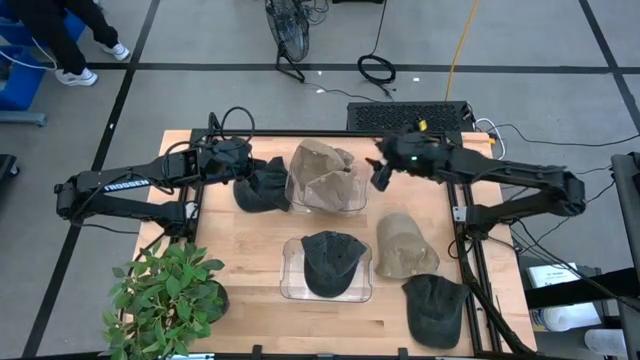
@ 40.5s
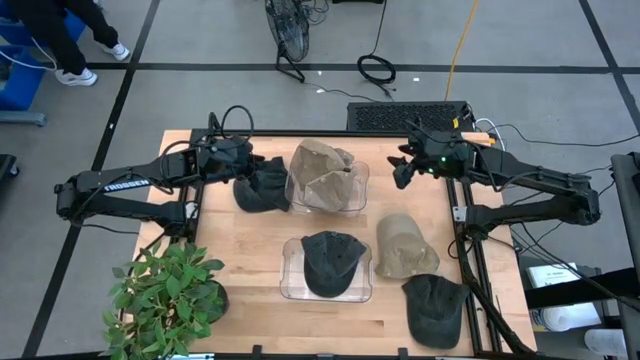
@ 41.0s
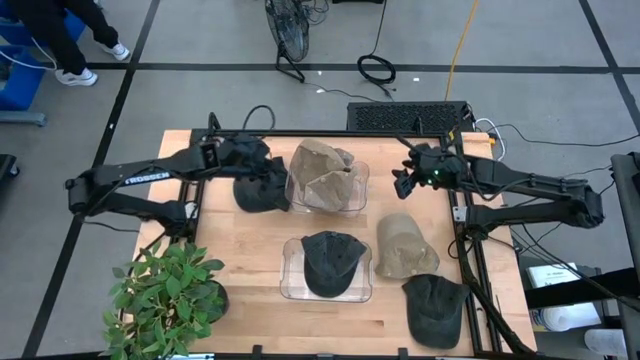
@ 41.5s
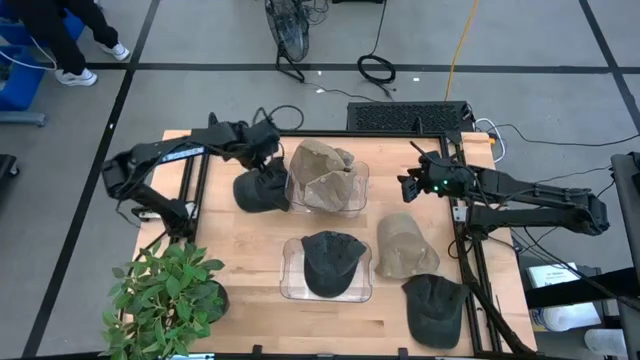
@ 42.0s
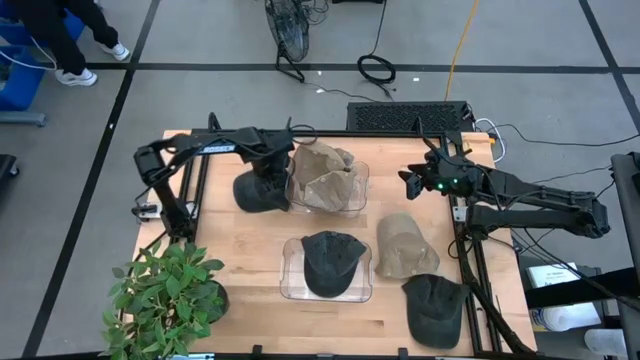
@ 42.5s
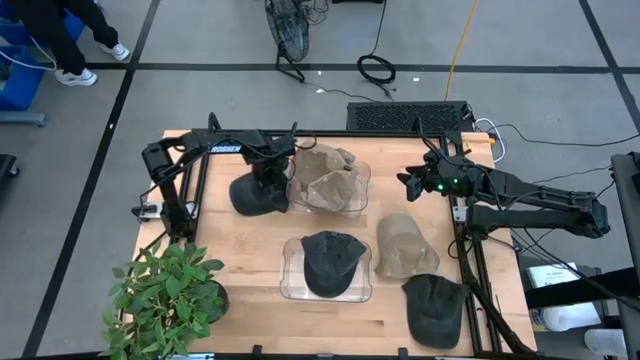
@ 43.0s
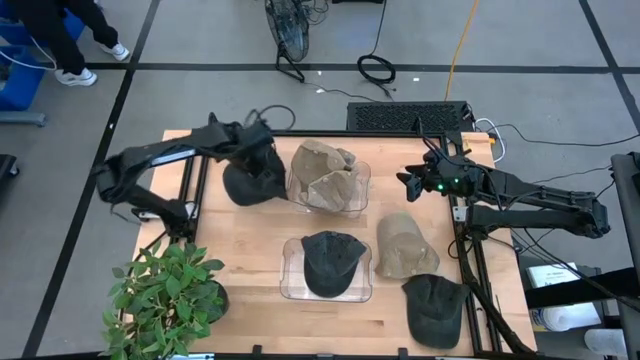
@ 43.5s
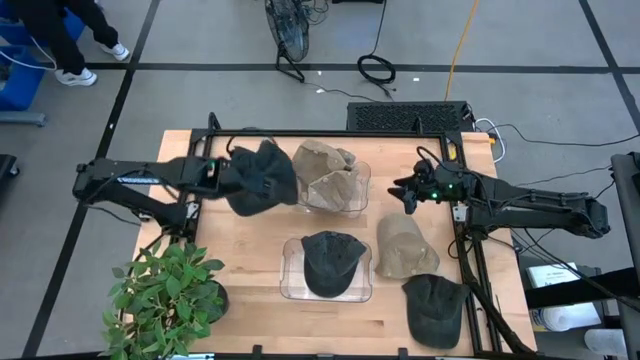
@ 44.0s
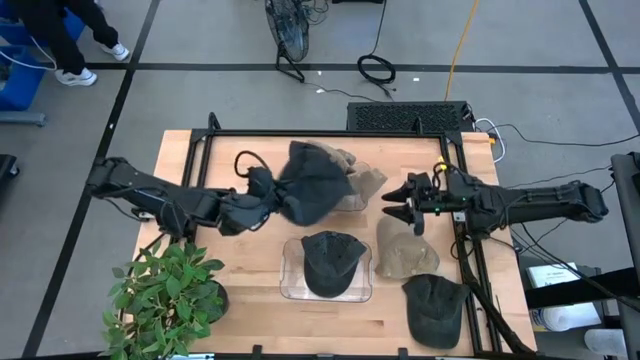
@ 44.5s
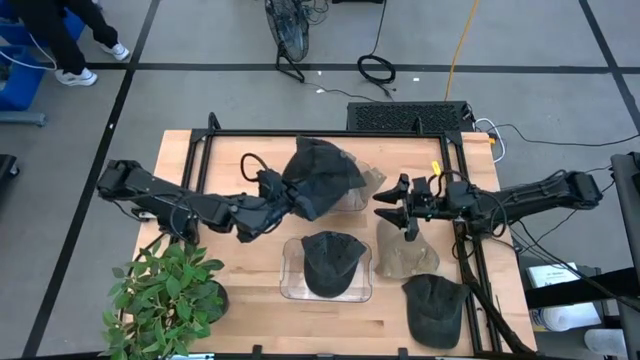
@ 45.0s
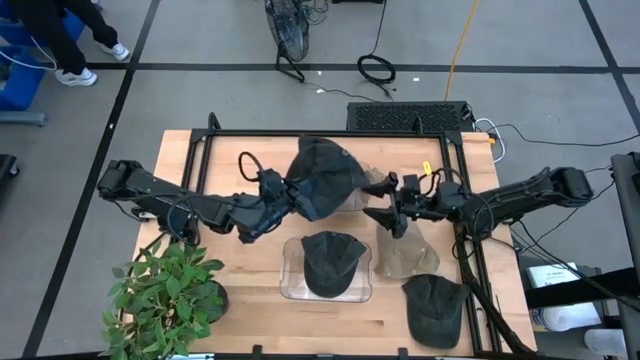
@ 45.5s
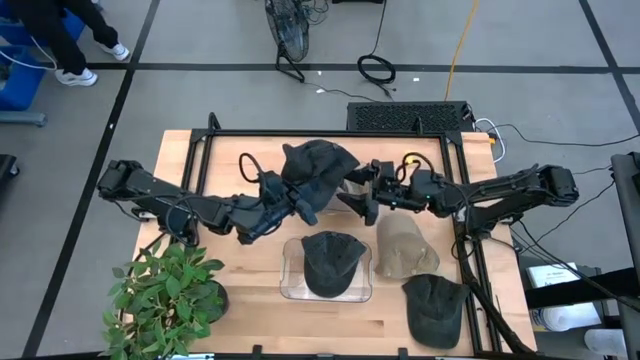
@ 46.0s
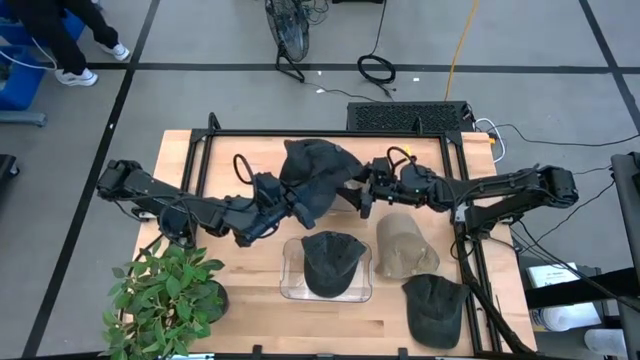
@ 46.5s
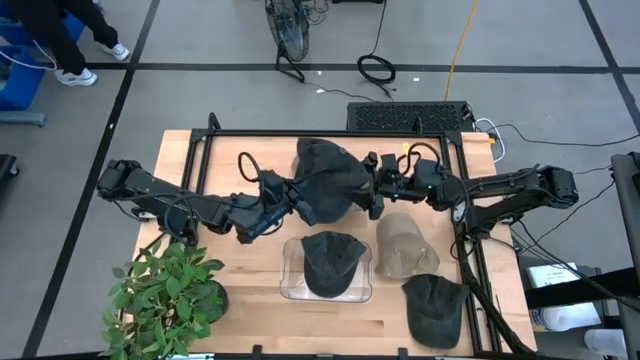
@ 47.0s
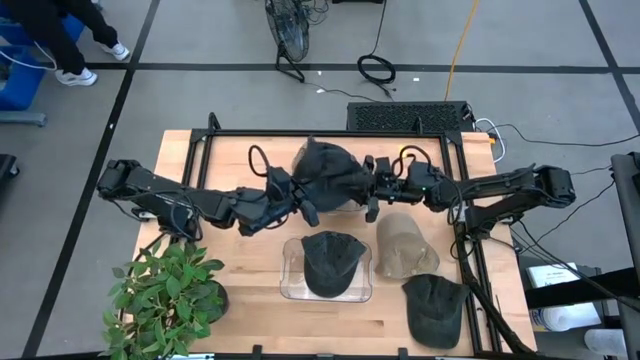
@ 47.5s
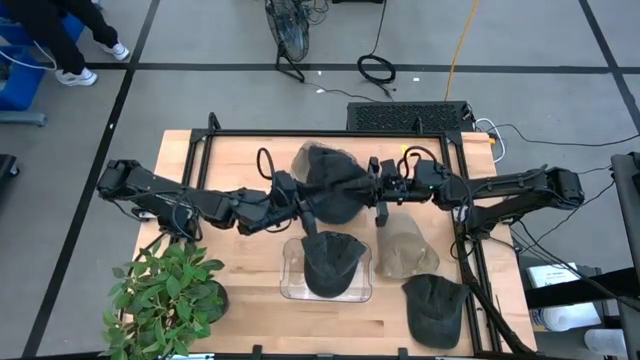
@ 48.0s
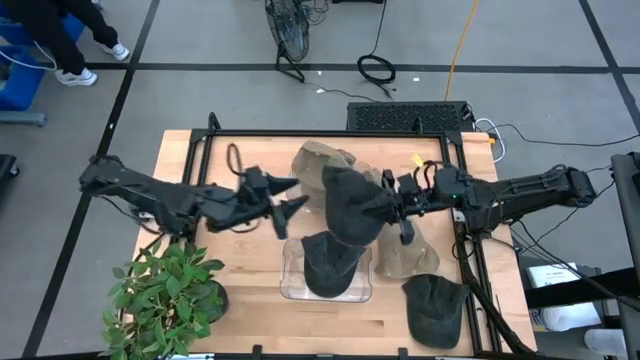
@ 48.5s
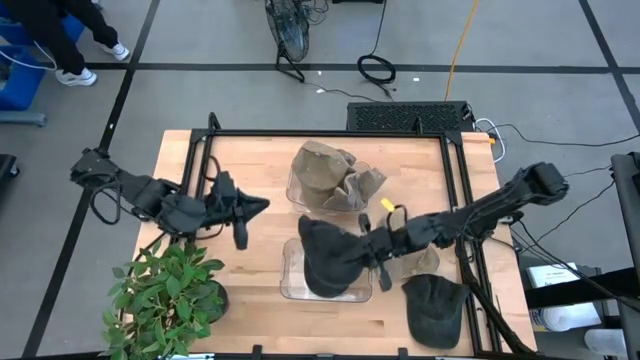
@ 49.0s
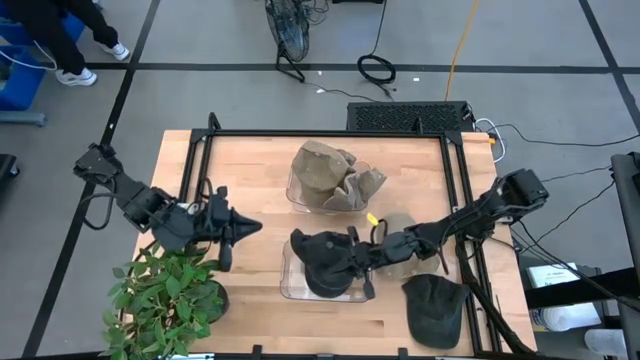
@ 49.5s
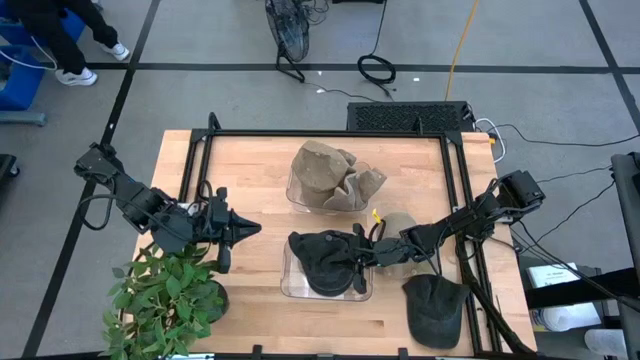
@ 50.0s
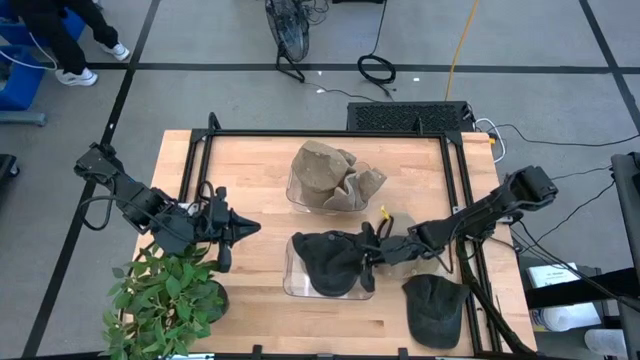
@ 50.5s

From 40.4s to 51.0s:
Task: Pick & Place hat
Put the black cap into the bottom transparent bin

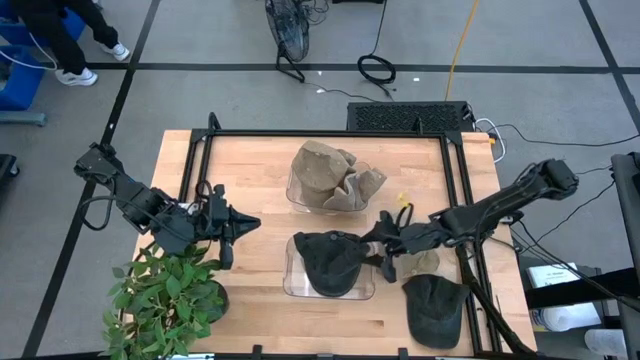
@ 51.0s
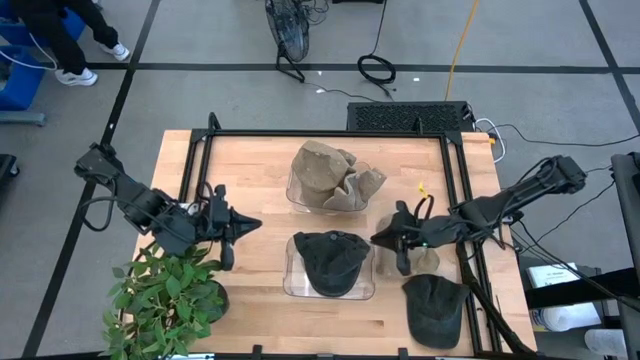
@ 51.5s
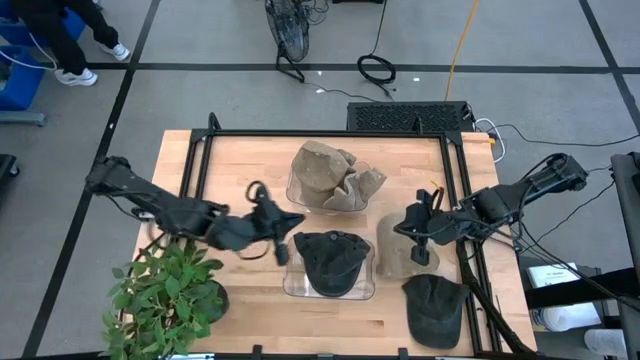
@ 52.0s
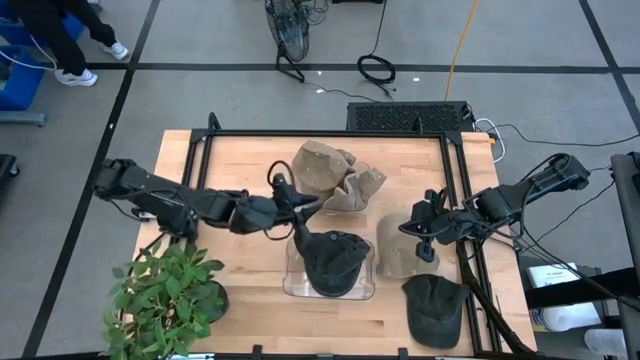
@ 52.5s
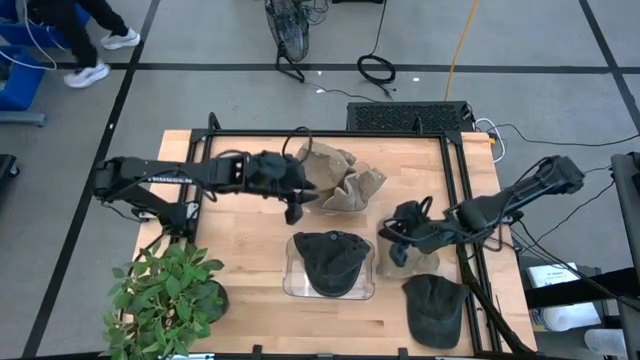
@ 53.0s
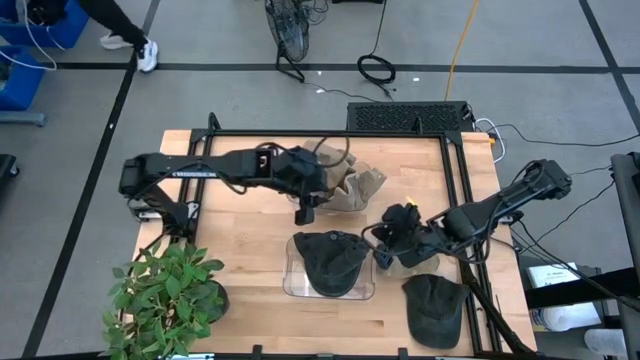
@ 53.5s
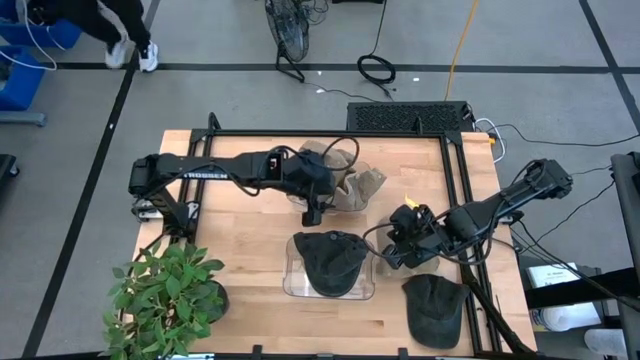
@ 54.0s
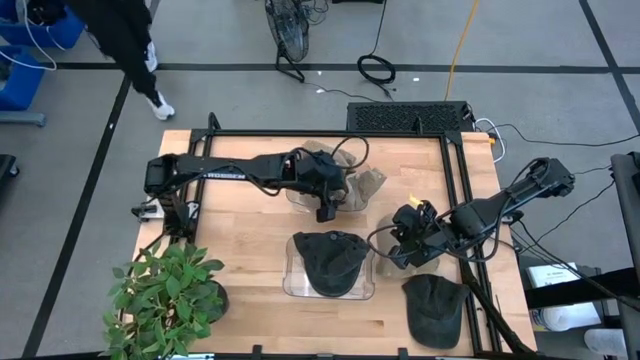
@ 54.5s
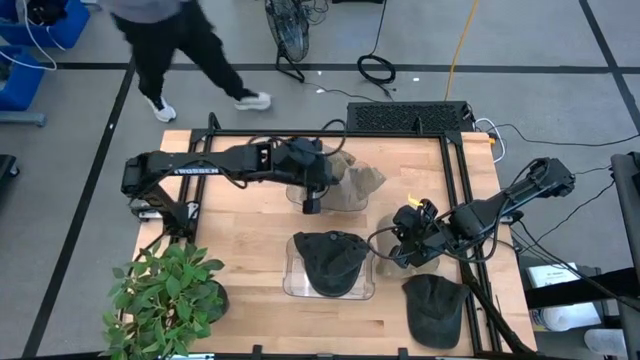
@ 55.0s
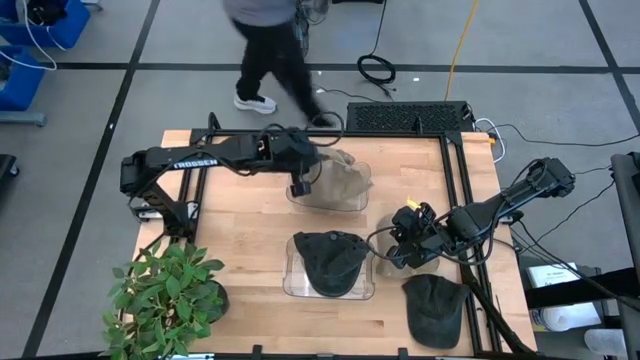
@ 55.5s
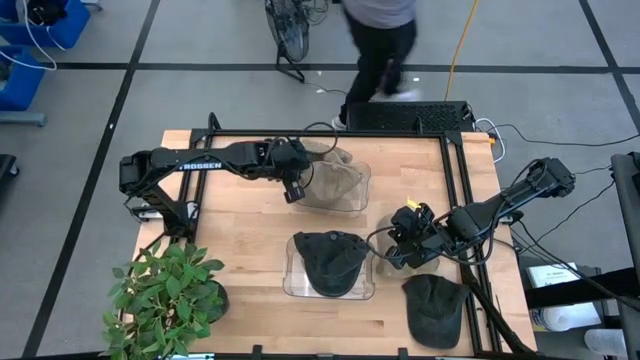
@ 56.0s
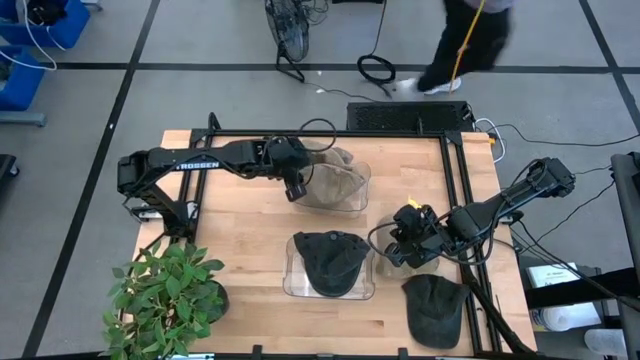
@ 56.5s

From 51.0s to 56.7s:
Adjust the brown cap in the top transparent bin

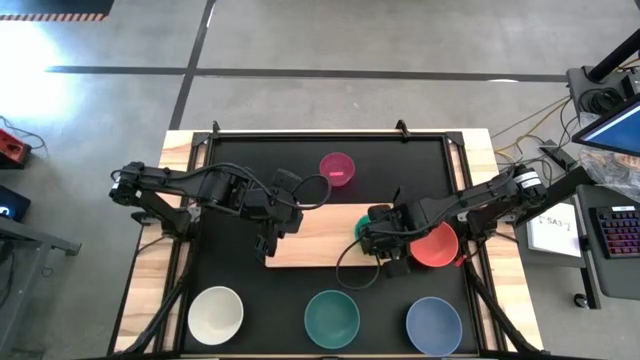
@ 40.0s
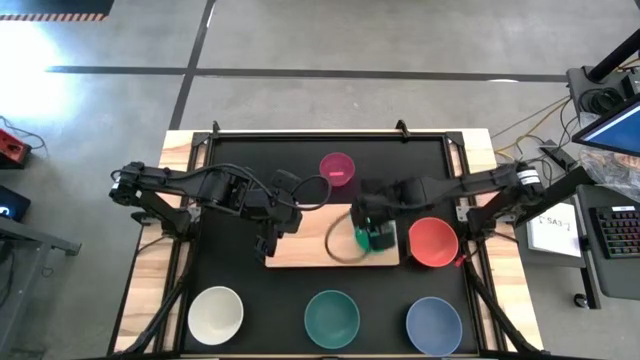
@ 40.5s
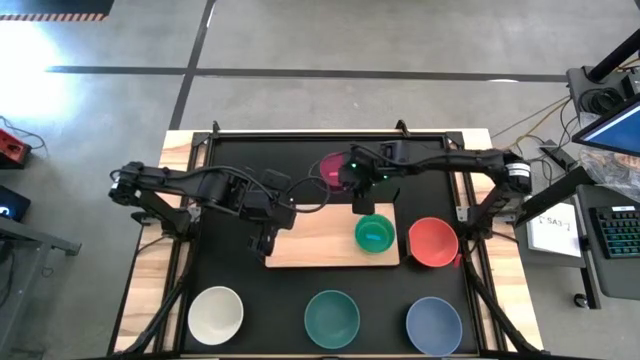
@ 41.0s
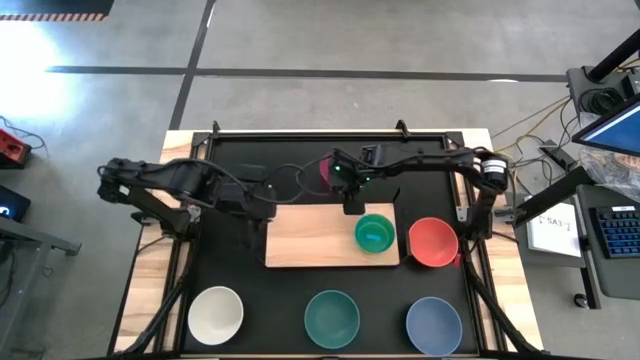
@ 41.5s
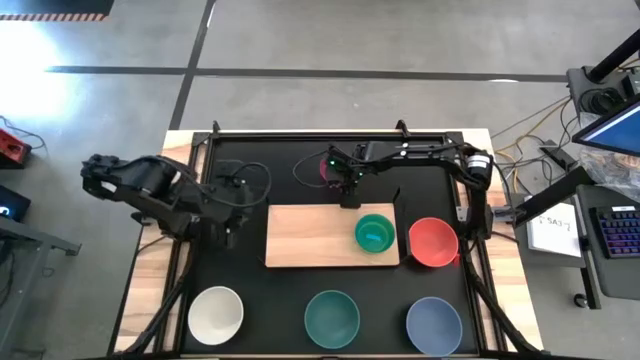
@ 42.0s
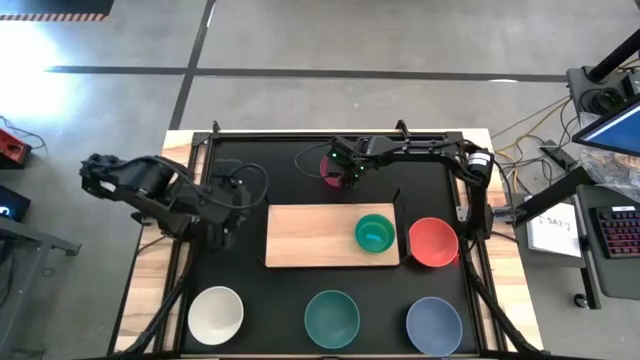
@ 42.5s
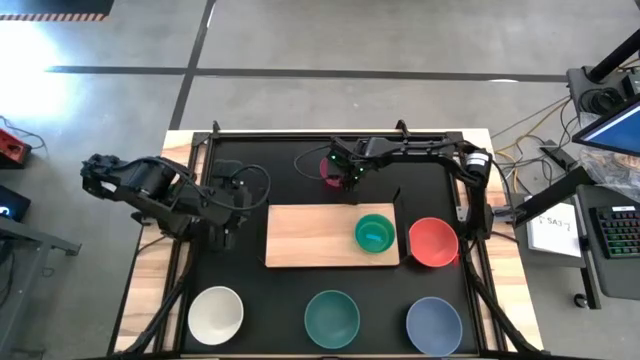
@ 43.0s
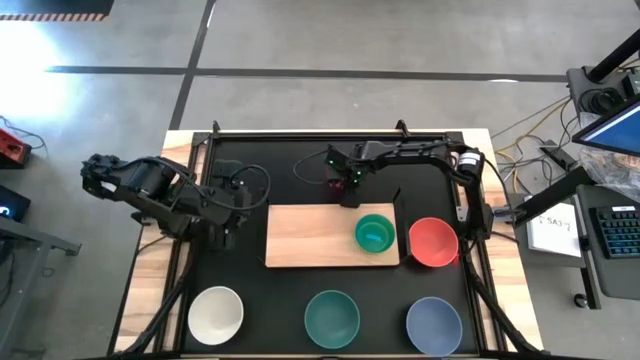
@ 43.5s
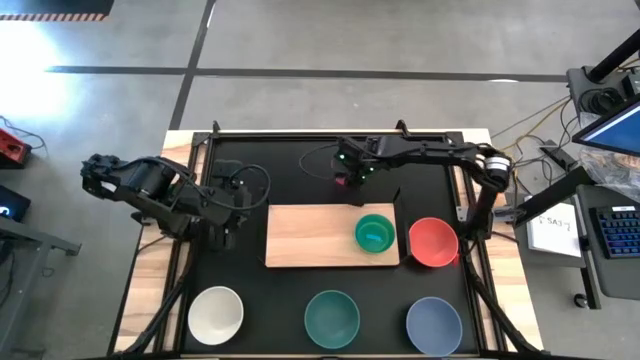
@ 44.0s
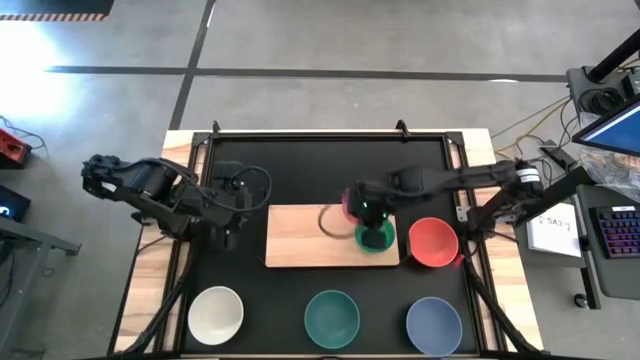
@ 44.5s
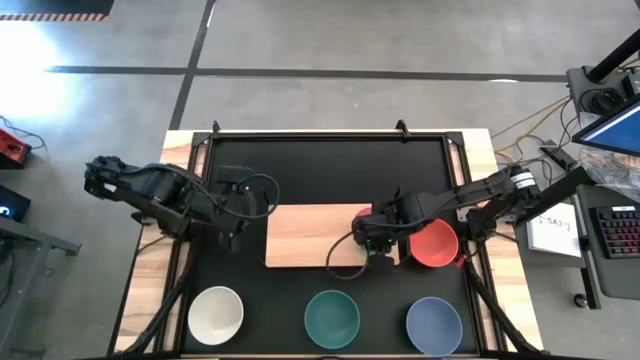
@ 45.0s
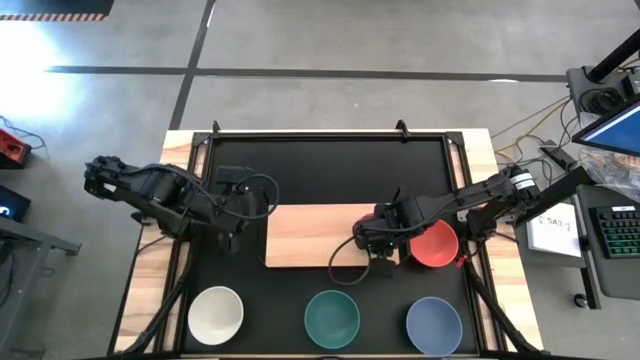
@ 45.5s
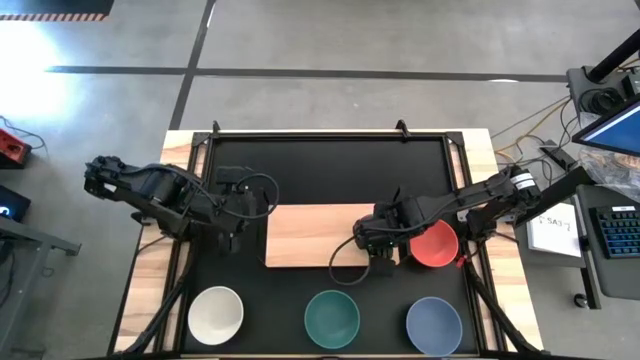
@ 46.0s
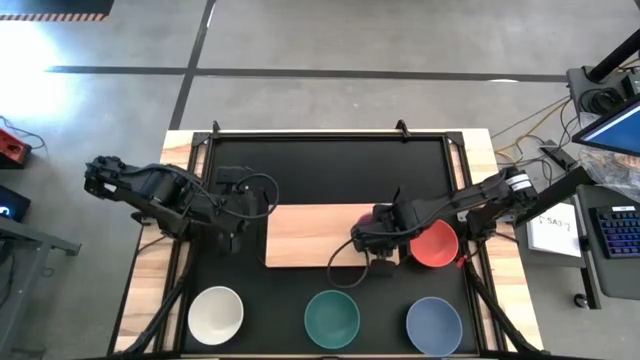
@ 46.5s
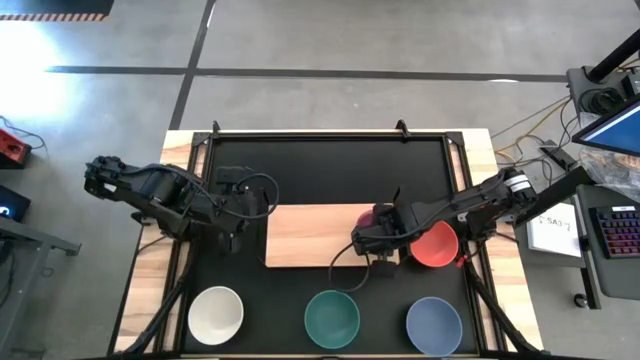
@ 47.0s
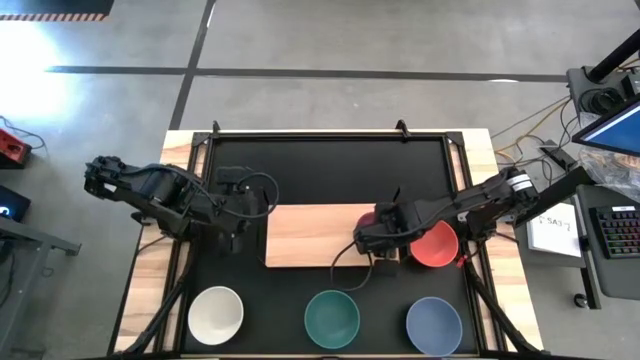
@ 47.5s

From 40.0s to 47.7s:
Task: Place and stack bowls onto a shelf
Stack the pink bowl on top of the blue bowl on the shelf
